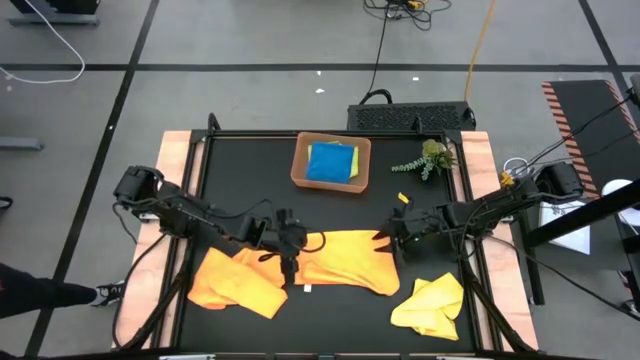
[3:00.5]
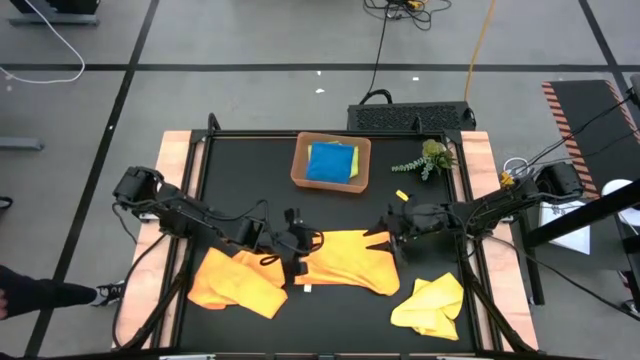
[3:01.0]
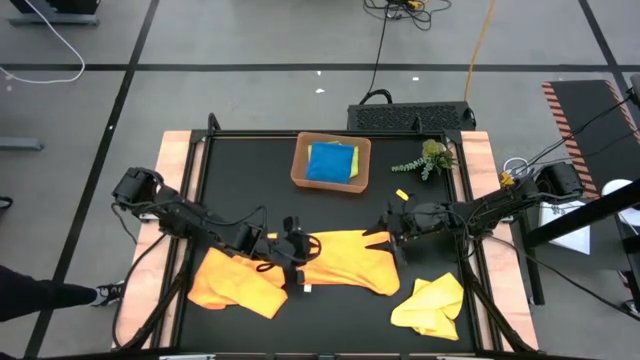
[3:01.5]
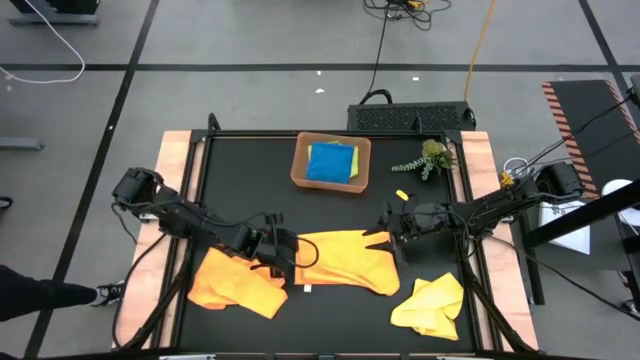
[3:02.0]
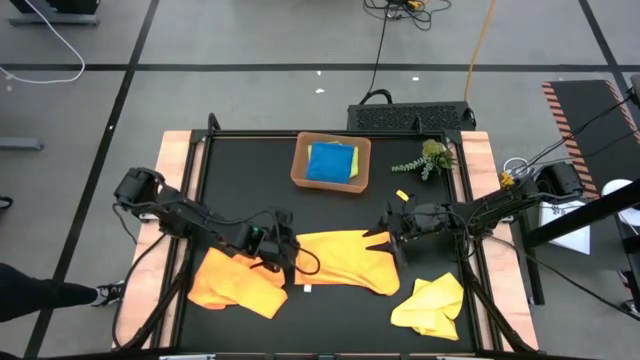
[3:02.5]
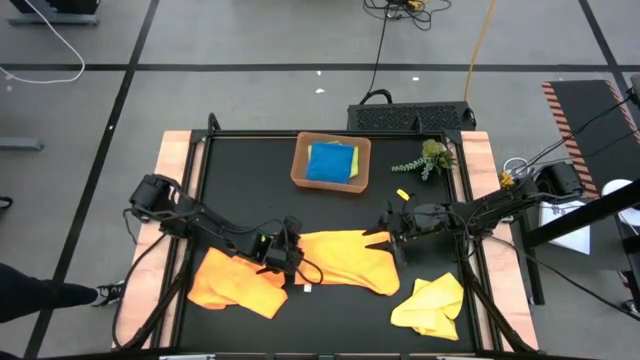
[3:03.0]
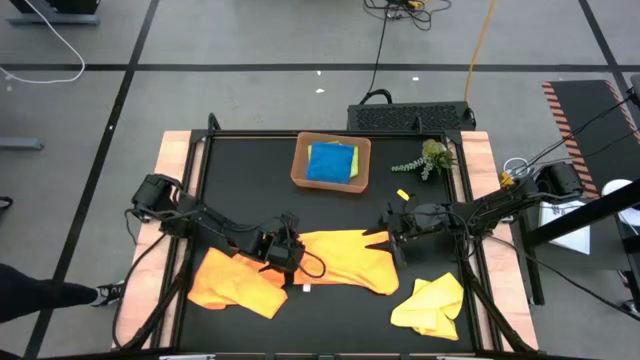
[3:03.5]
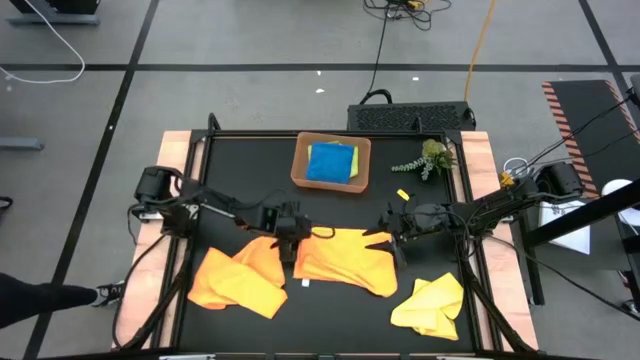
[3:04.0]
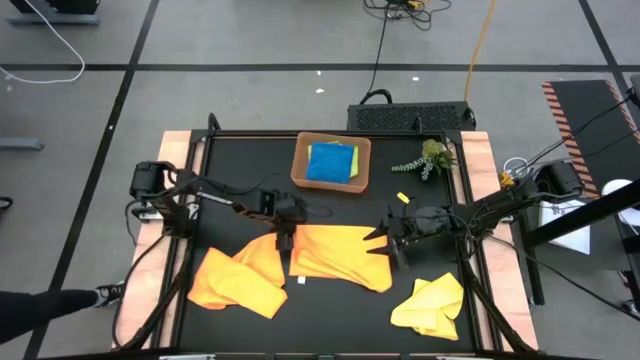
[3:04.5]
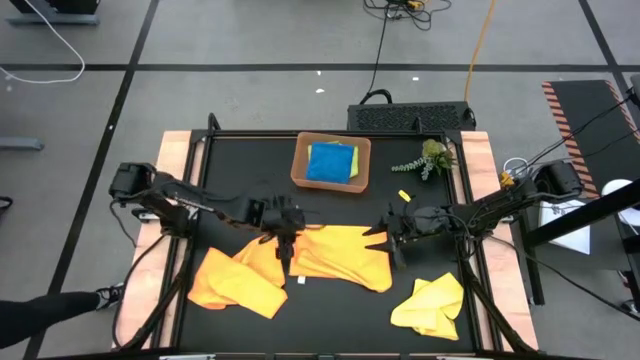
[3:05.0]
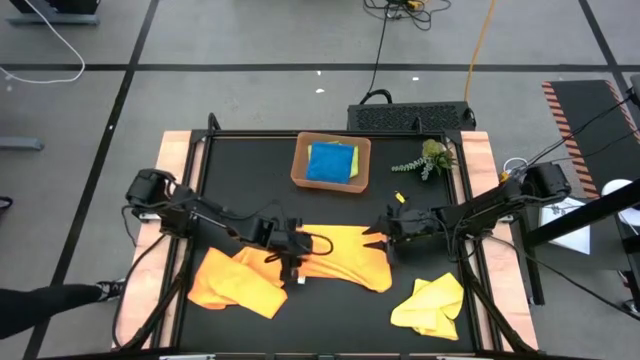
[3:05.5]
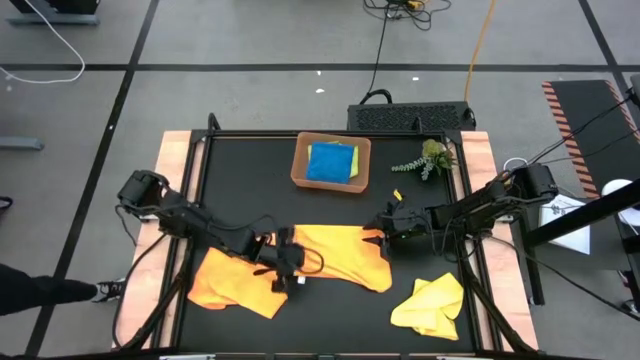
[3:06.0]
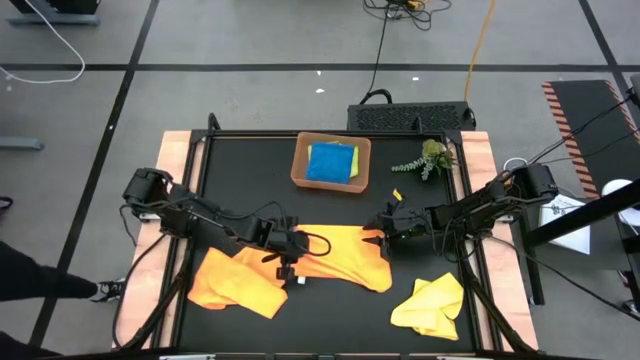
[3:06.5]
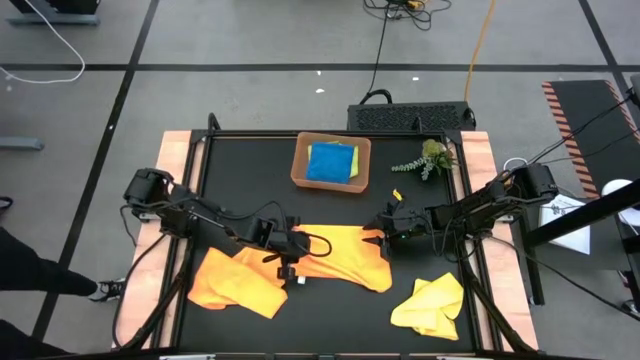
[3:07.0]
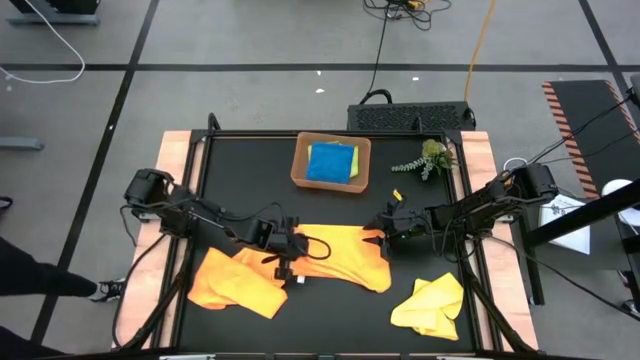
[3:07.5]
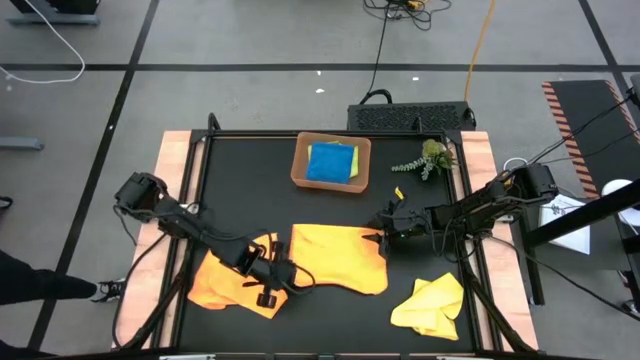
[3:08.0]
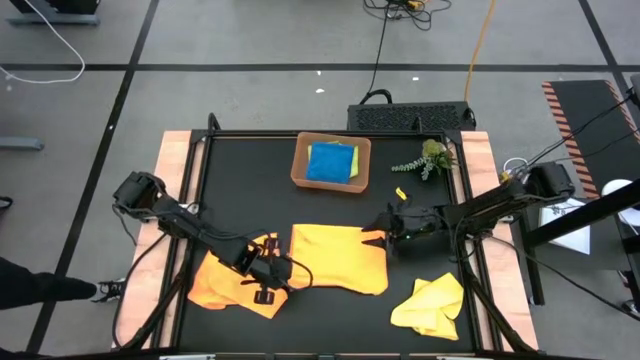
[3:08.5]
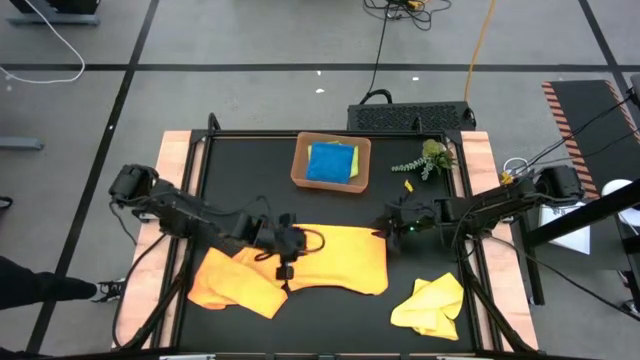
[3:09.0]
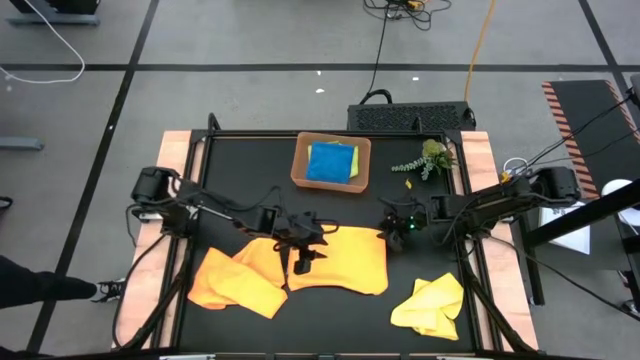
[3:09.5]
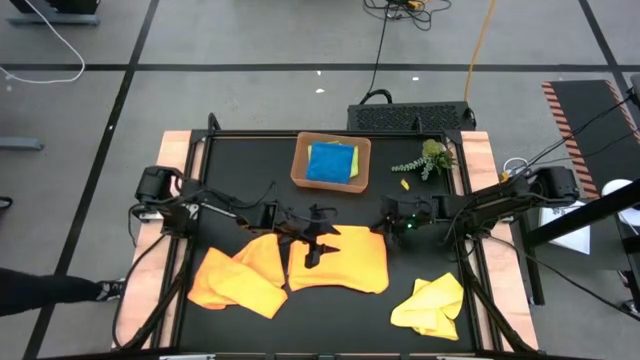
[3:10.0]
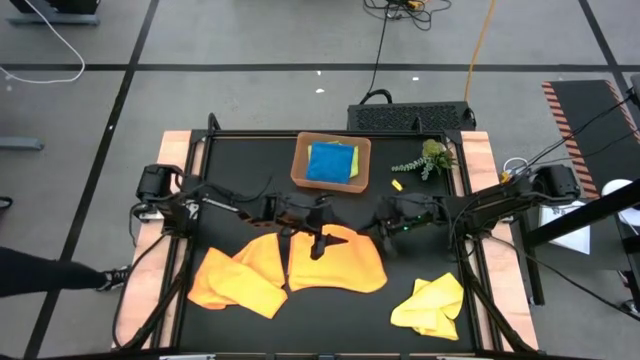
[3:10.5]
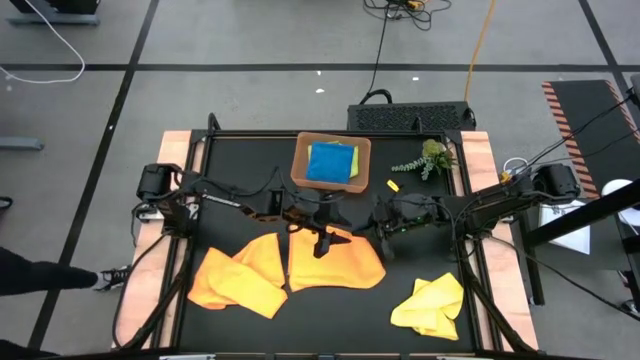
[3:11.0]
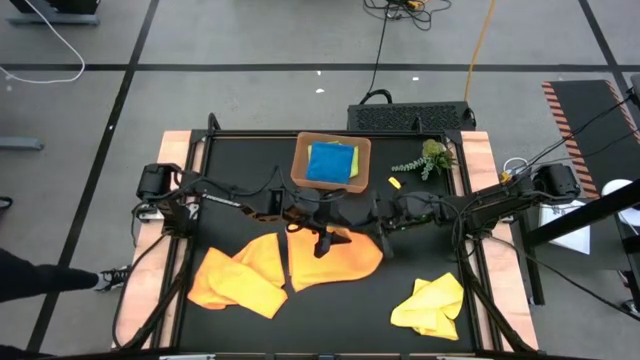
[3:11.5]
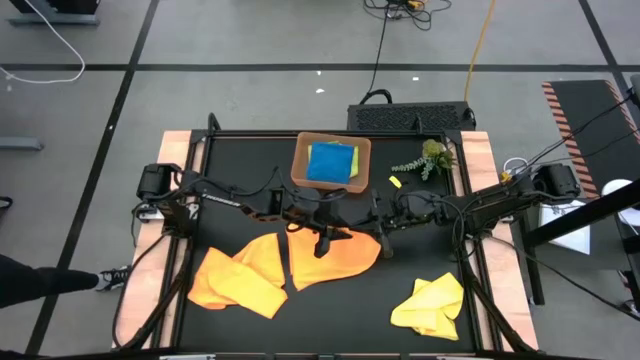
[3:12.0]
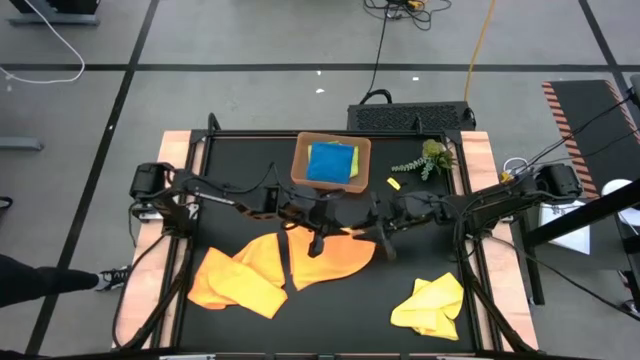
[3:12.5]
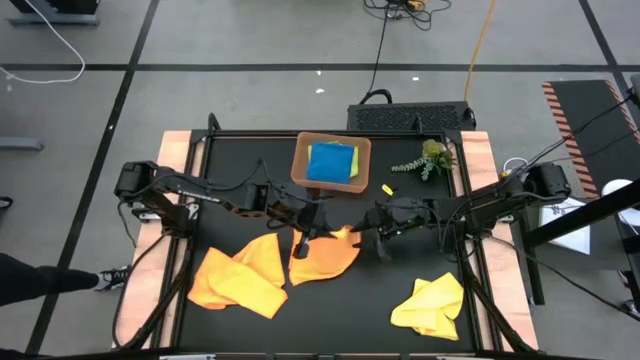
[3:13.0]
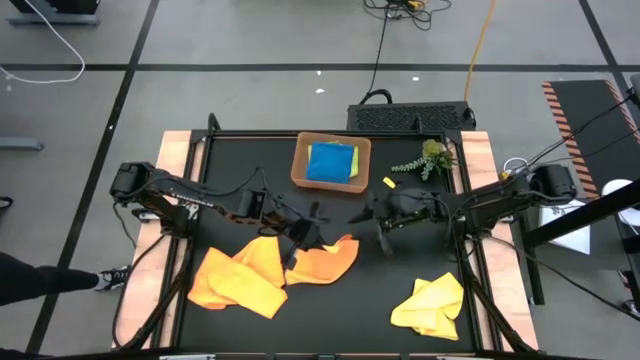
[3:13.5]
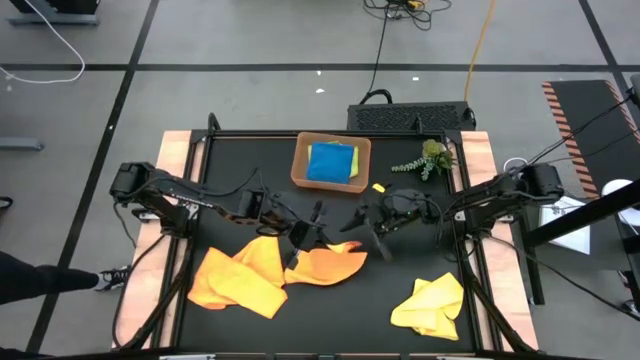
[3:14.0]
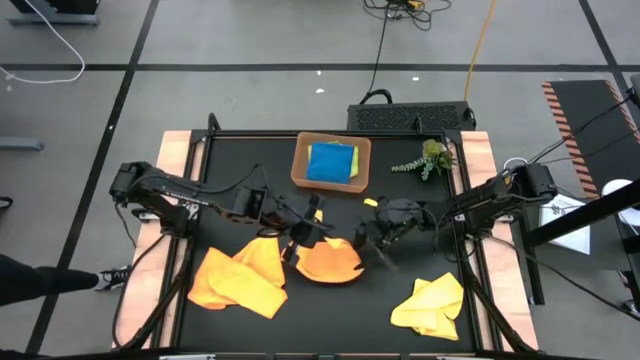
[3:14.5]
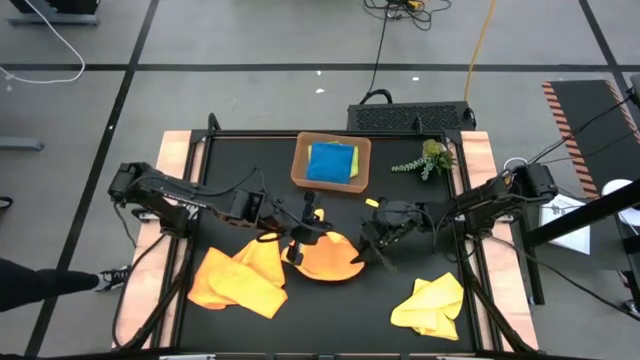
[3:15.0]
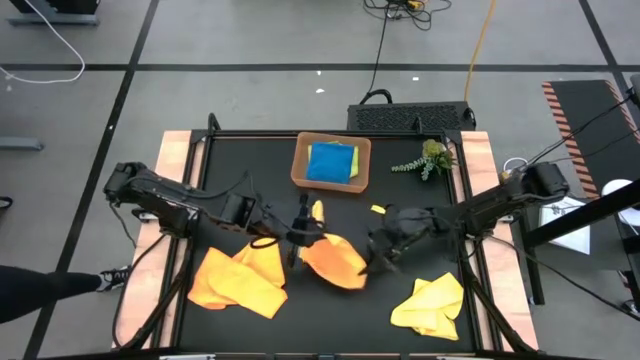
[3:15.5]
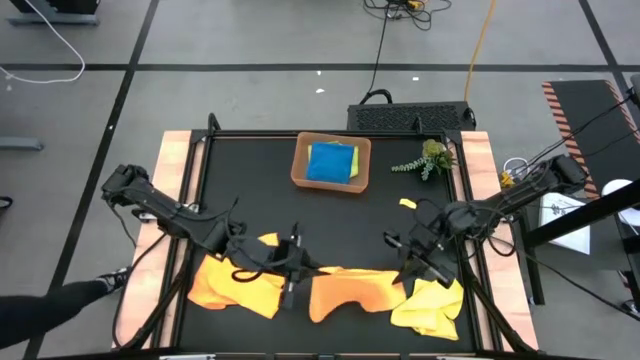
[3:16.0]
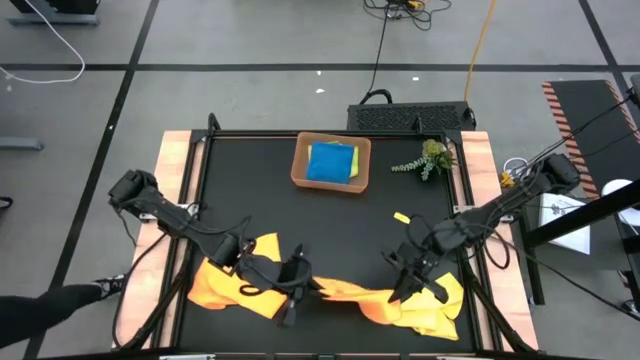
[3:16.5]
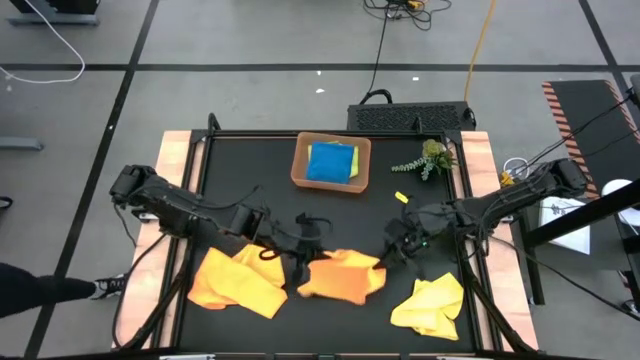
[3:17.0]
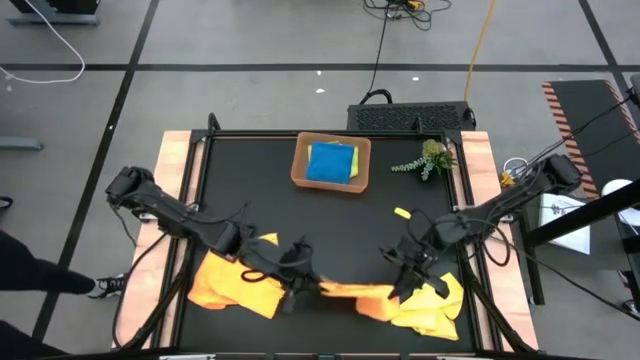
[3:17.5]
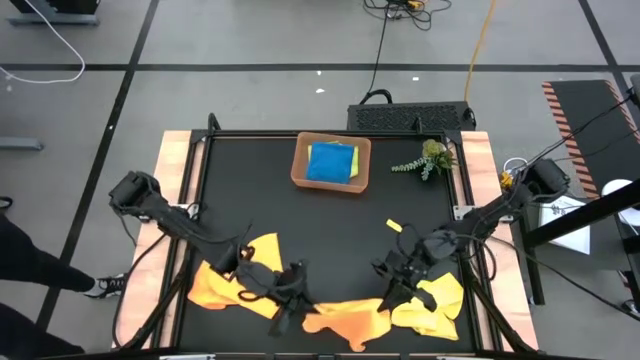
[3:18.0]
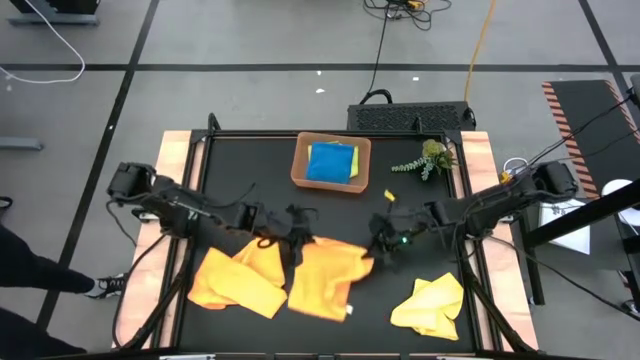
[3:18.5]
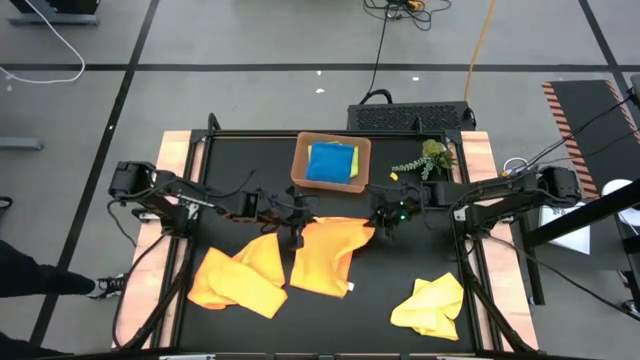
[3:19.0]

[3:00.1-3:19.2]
Task: Fold microfiber towels
Fold the orange microfiber towel

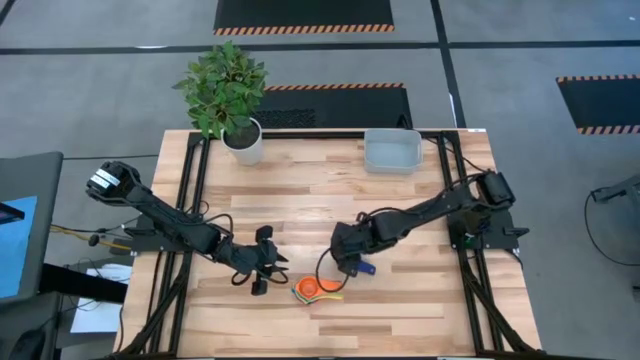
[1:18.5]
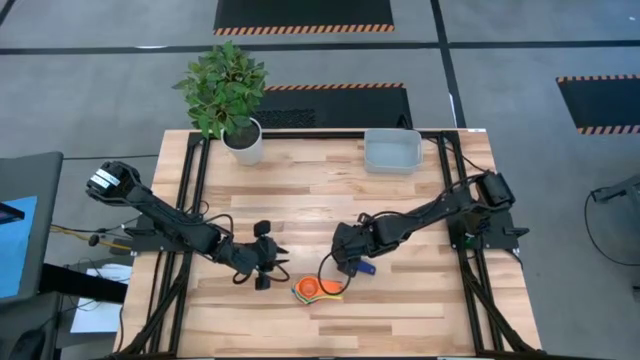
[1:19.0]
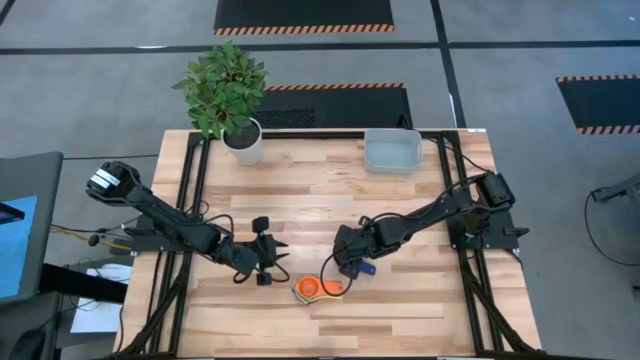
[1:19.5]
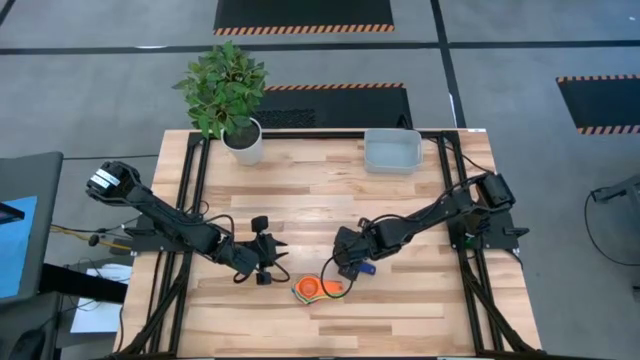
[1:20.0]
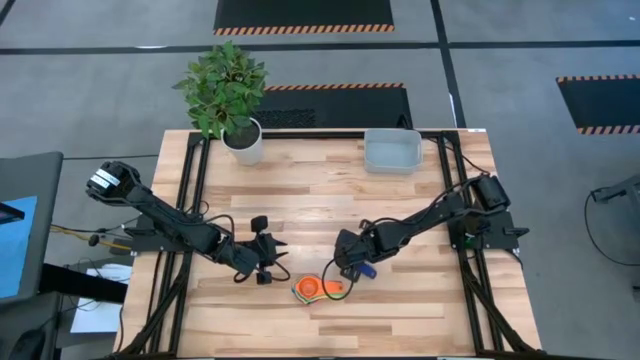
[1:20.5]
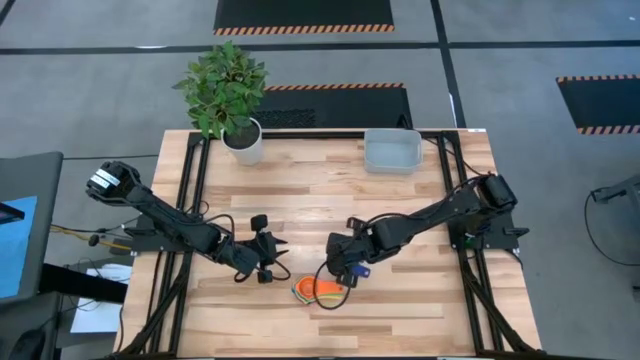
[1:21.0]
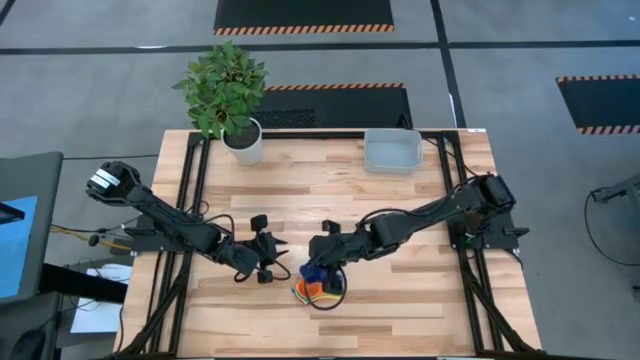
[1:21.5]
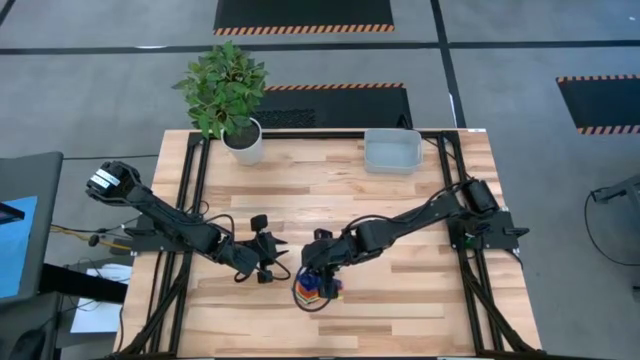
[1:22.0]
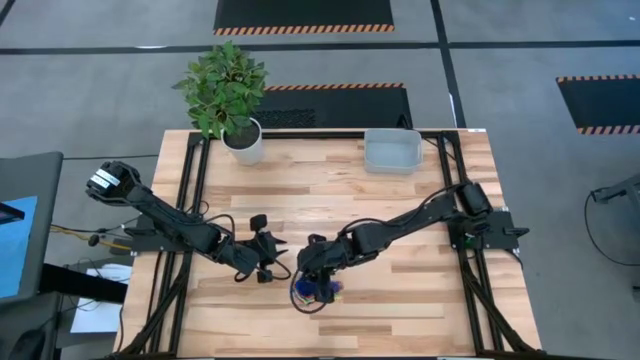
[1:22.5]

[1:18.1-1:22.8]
Task: Nest measuring cups in basket
Stack the dark blue measuring cup on top of the orange measuring cup
